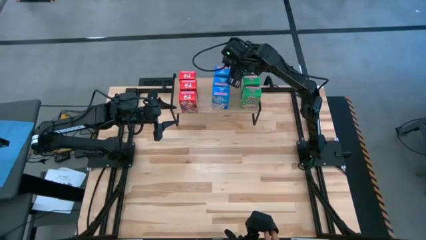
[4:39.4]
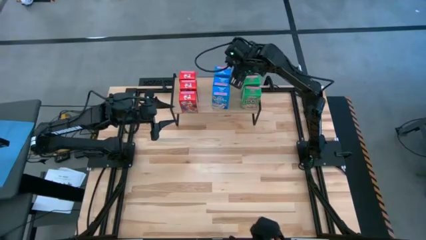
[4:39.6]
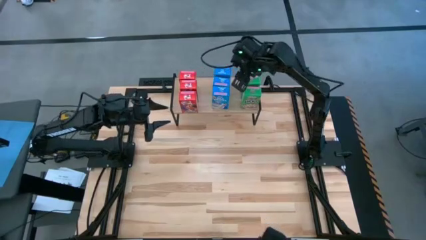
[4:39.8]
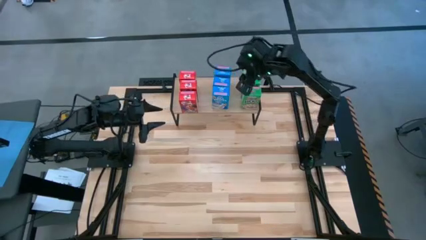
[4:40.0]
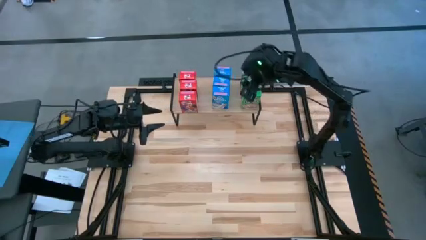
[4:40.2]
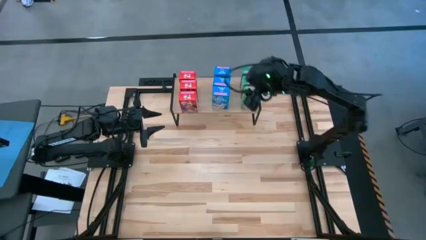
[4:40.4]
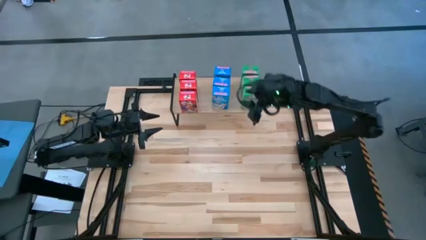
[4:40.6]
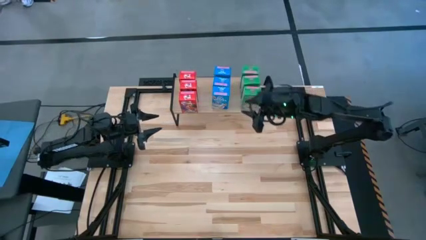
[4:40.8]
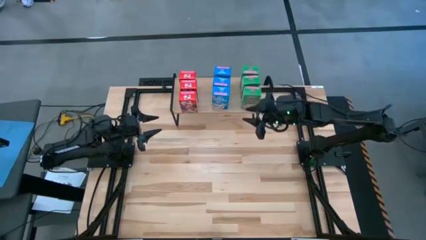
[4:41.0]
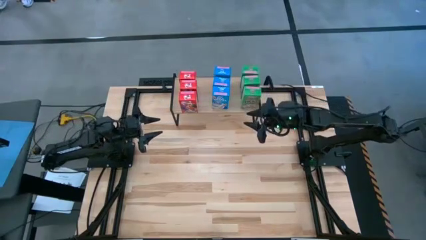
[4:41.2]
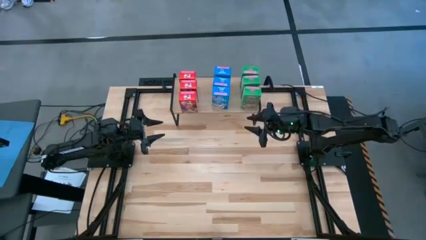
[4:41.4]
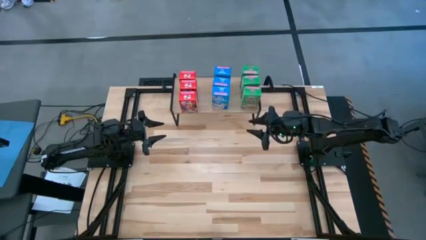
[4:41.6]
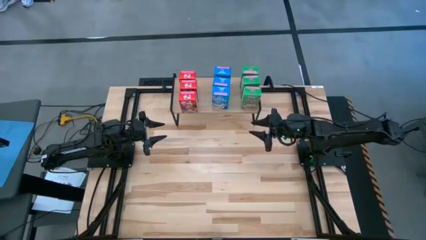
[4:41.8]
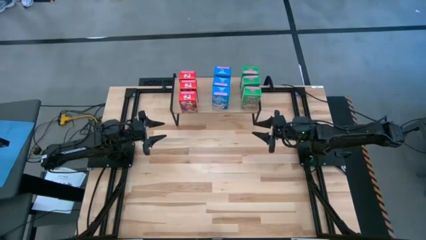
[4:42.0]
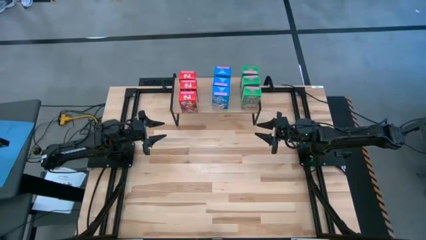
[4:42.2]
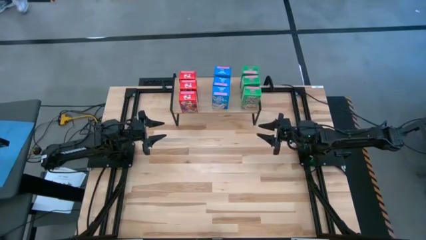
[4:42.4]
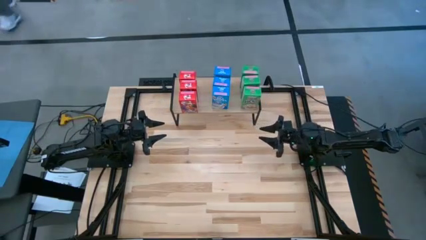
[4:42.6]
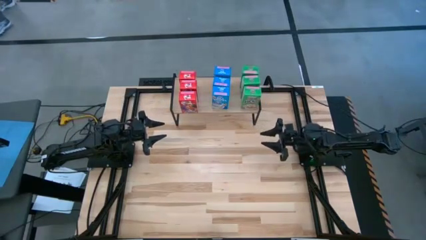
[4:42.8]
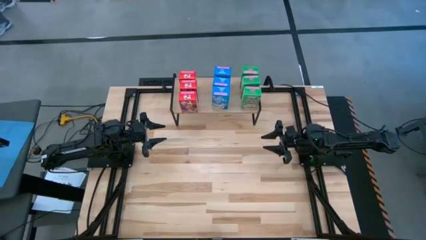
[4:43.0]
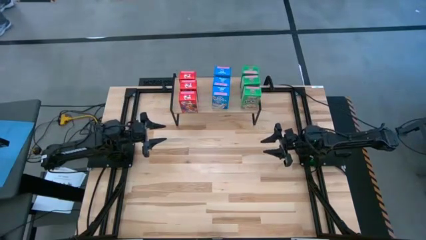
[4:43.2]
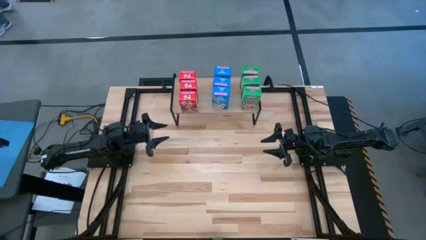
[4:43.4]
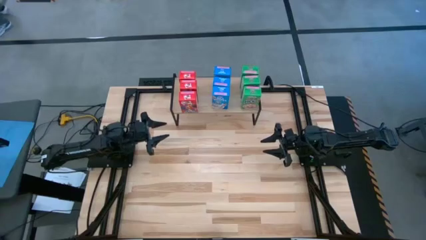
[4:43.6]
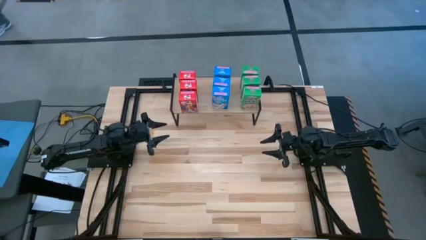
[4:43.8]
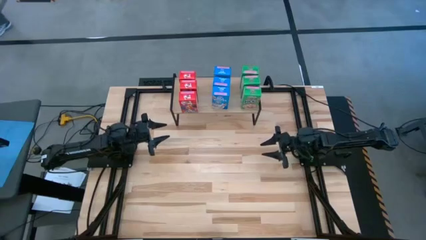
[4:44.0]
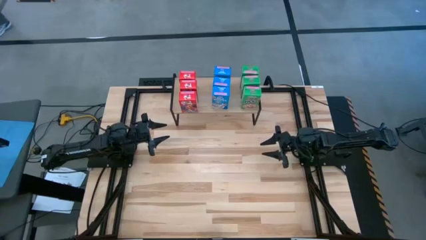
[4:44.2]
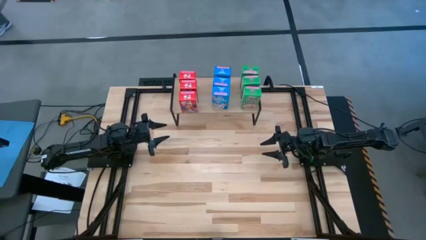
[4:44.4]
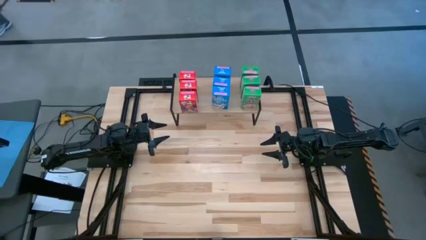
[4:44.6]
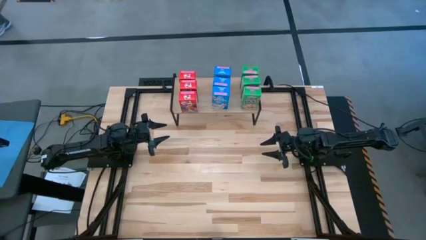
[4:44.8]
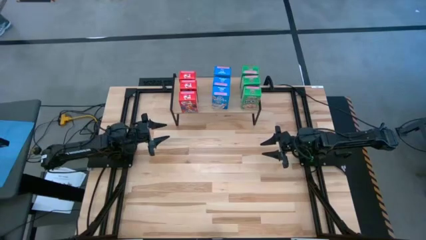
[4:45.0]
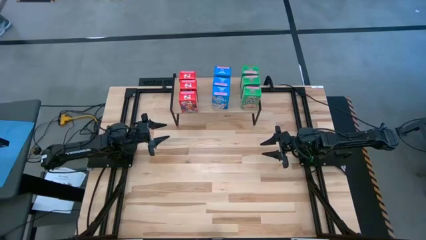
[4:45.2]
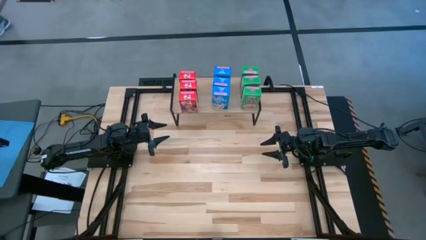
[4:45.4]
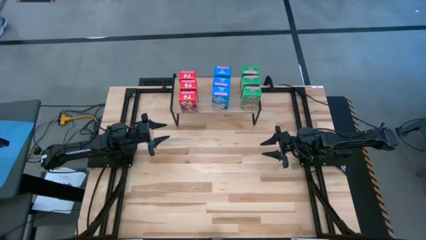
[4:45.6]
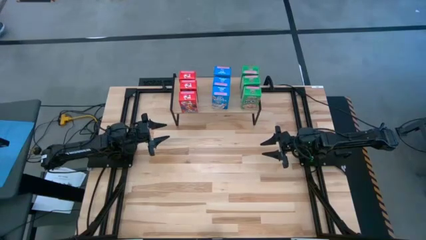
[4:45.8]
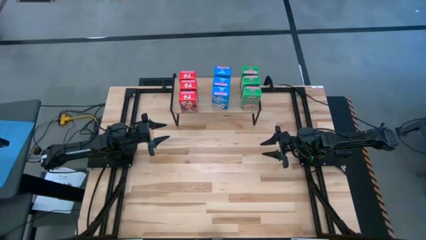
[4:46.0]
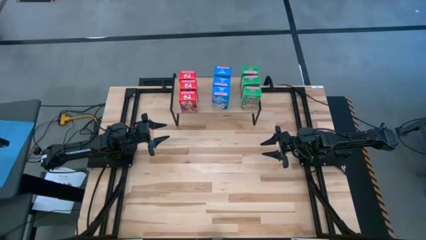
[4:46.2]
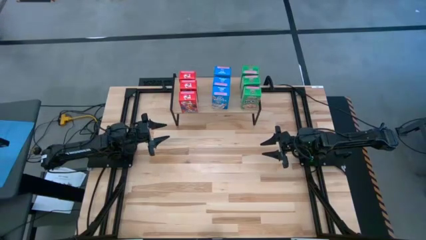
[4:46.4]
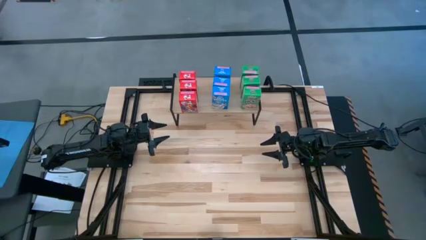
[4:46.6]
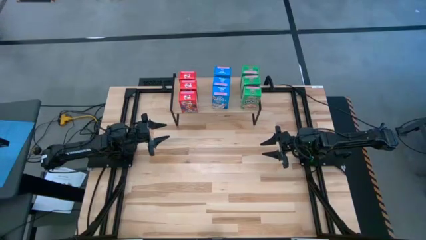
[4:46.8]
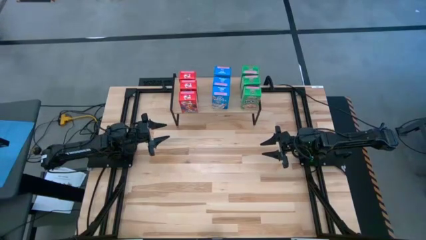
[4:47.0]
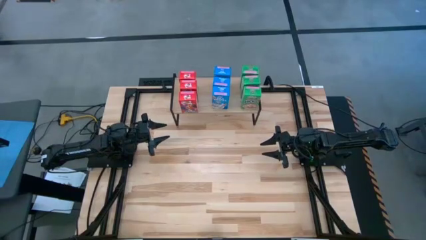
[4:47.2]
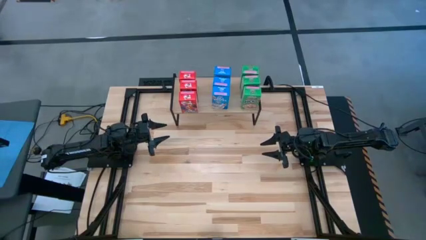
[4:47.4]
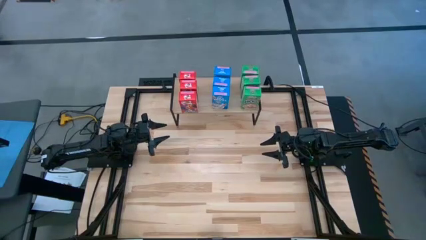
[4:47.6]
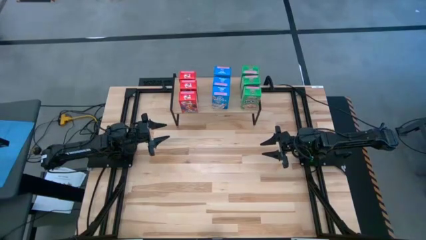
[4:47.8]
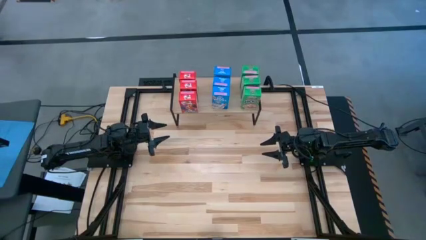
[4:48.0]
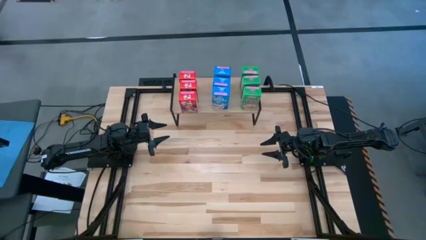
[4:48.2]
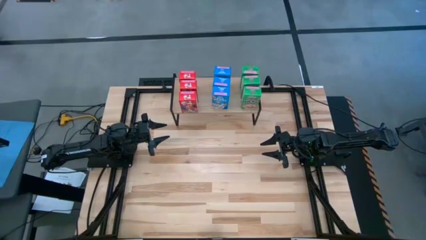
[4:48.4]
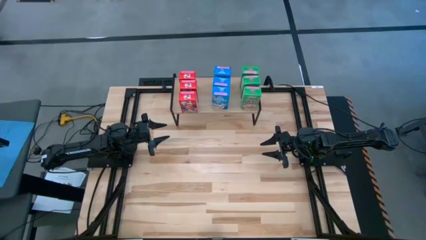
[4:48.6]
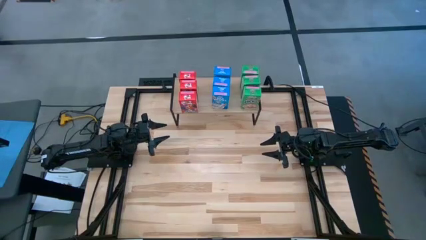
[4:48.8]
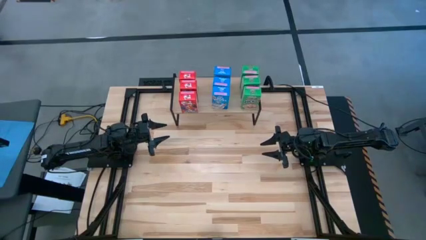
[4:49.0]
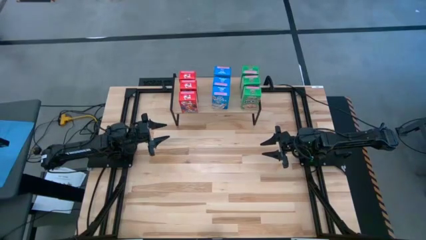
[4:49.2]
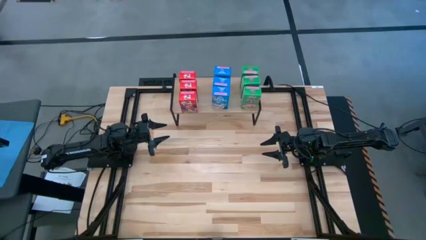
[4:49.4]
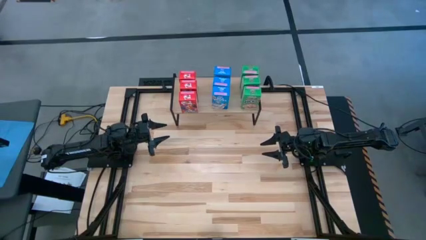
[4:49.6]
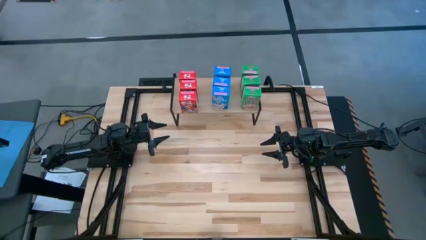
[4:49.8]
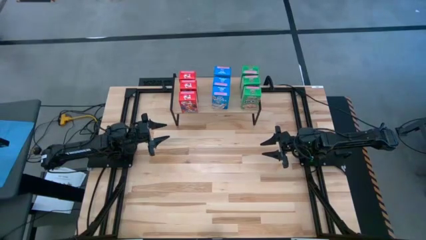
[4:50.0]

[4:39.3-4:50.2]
Task: Stack cereal on shelf
Return to Home Position

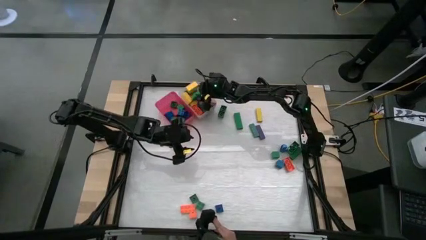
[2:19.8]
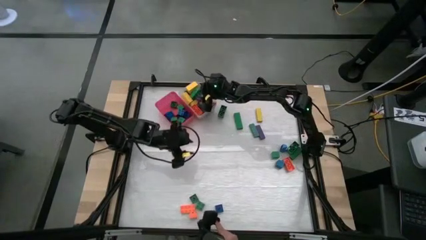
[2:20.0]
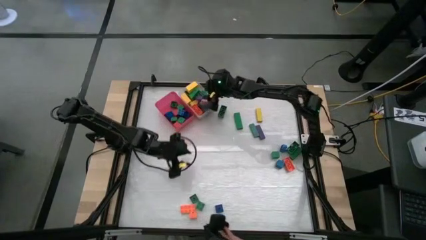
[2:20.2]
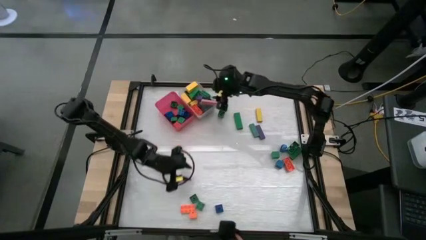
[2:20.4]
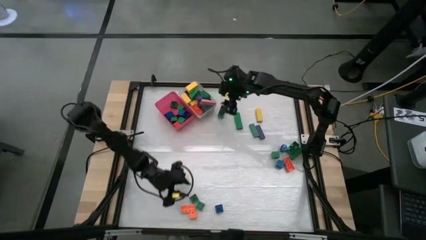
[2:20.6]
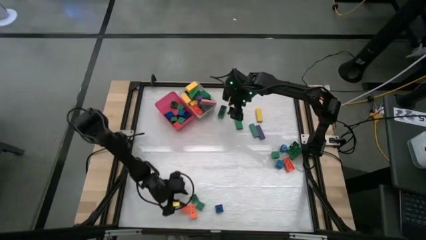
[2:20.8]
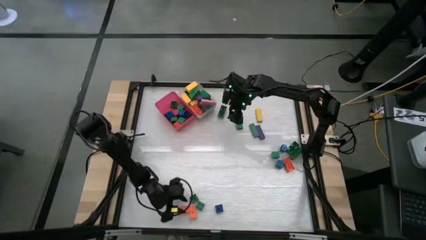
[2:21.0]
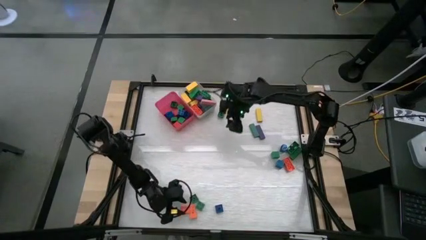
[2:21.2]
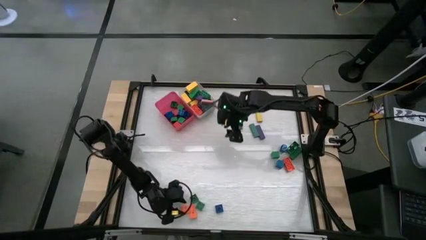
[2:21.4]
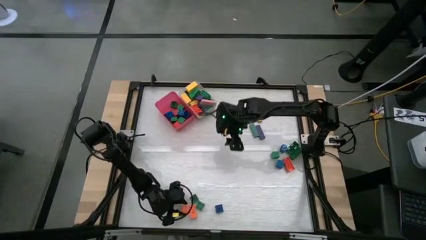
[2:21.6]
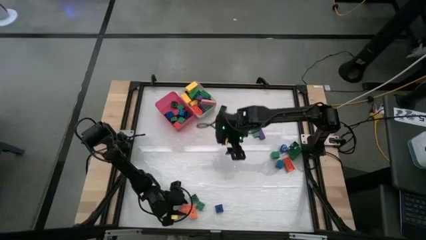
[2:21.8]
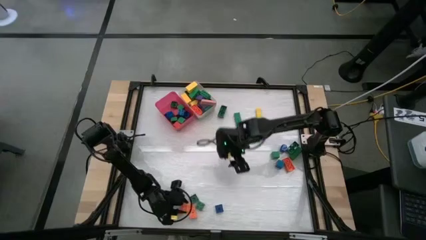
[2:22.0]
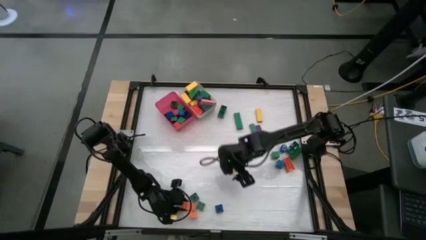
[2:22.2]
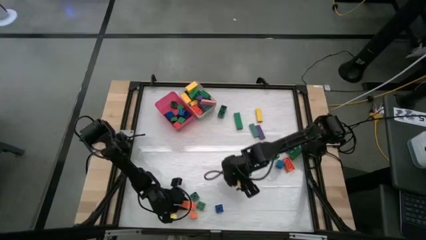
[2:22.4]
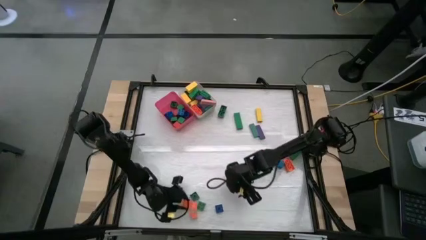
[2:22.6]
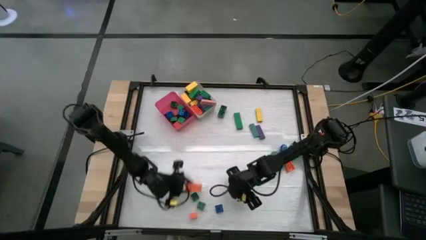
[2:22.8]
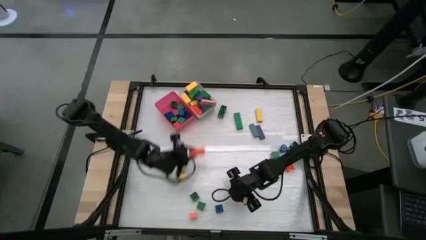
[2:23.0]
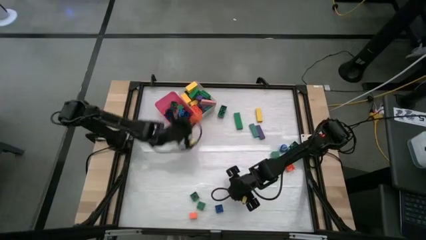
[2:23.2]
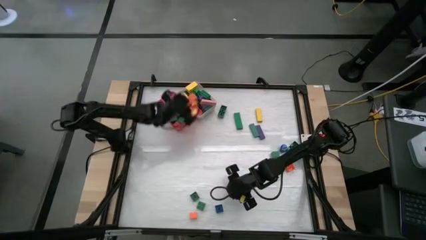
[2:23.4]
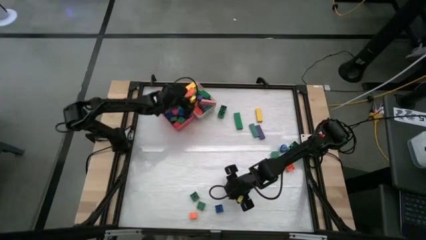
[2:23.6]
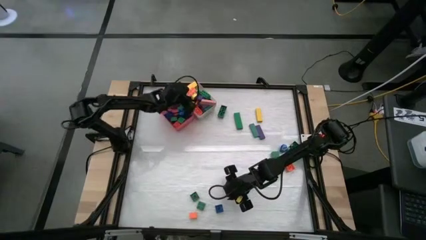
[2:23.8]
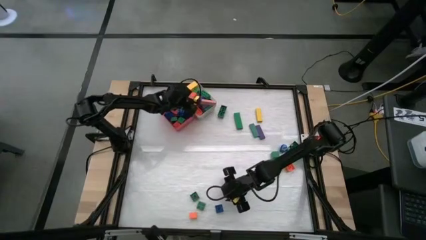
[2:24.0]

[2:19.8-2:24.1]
Task: Sort blocks by size
Put the big orange game piece into the white bin

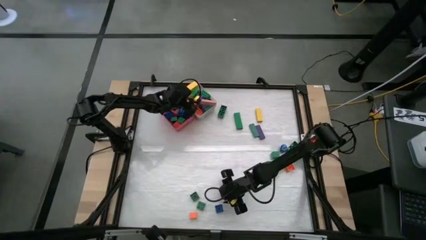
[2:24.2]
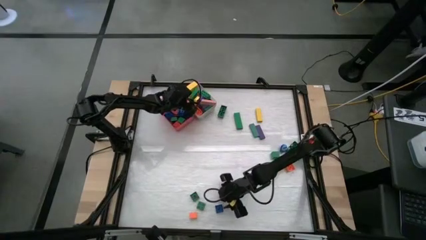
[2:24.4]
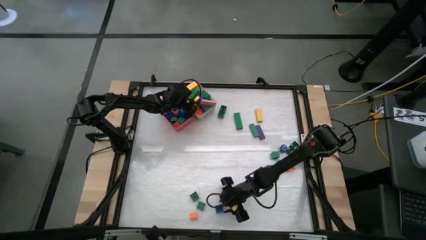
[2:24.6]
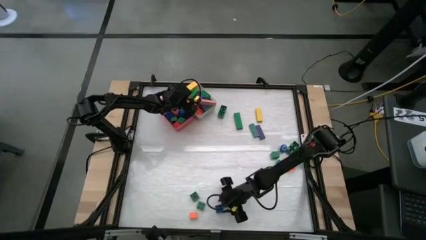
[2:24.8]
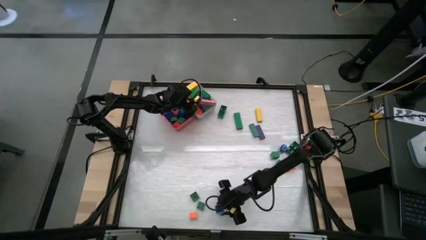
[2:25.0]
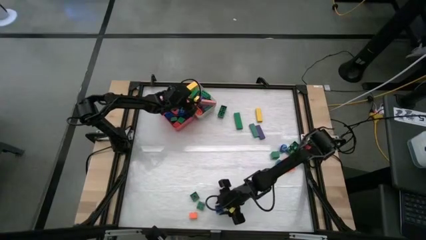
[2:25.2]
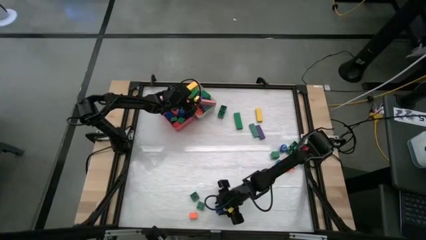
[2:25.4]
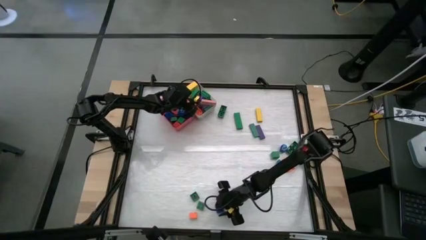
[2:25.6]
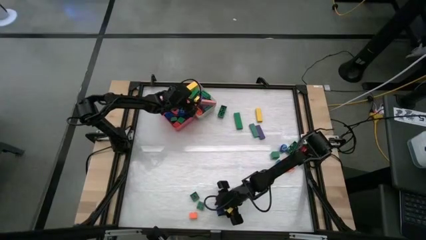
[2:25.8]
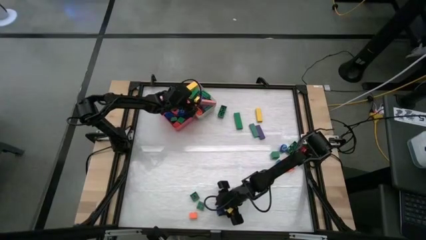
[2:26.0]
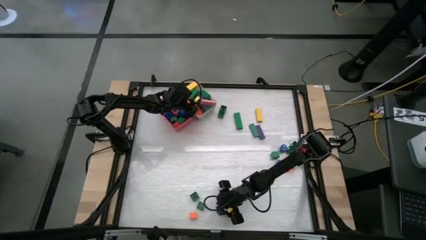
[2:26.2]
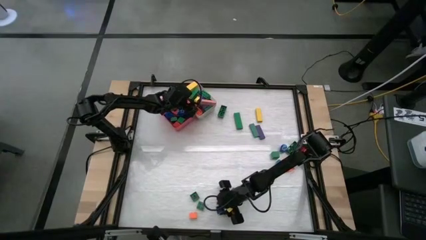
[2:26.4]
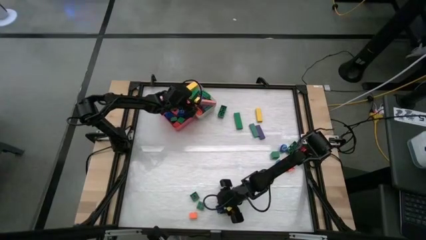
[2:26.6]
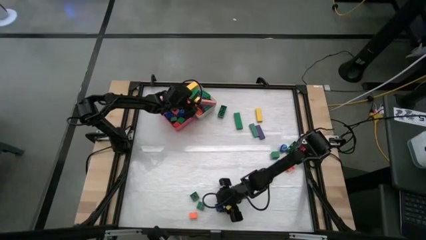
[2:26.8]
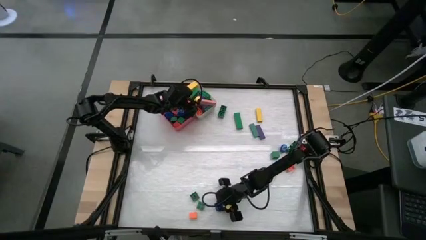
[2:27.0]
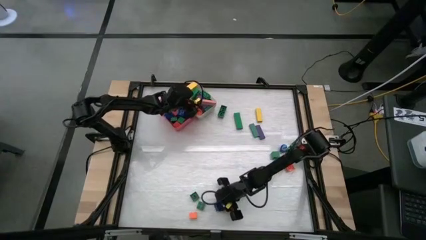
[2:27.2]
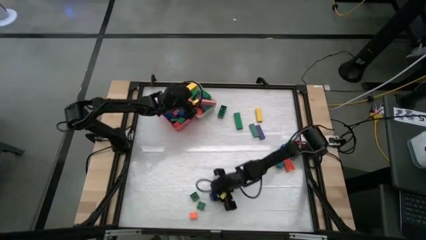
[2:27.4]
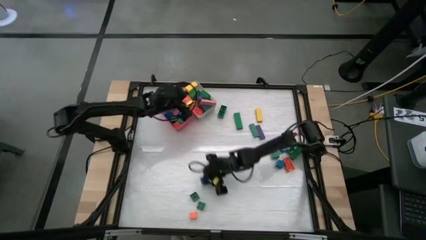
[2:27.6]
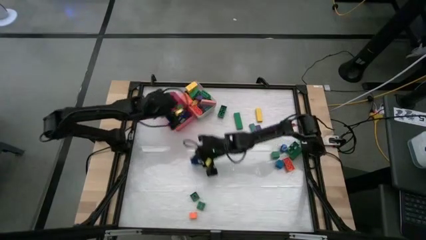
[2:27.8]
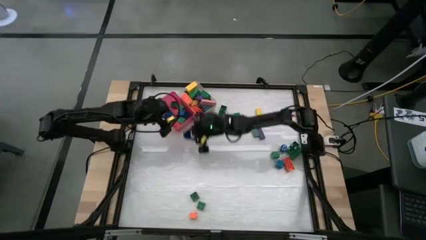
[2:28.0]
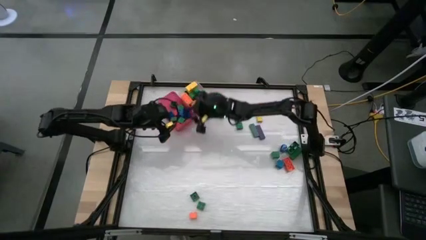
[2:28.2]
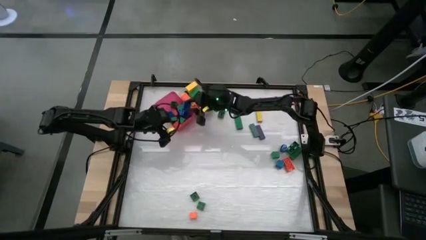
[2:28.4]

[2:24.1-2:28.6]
Put the small blue game piece into the pink bin
